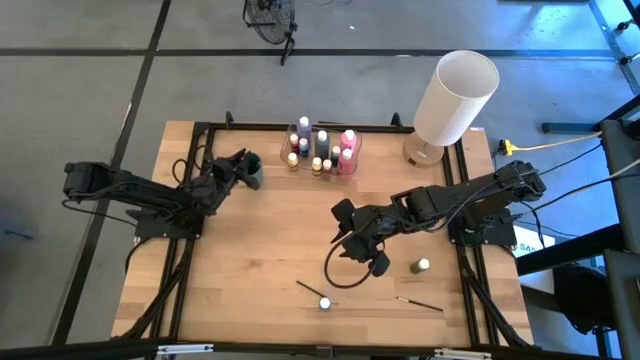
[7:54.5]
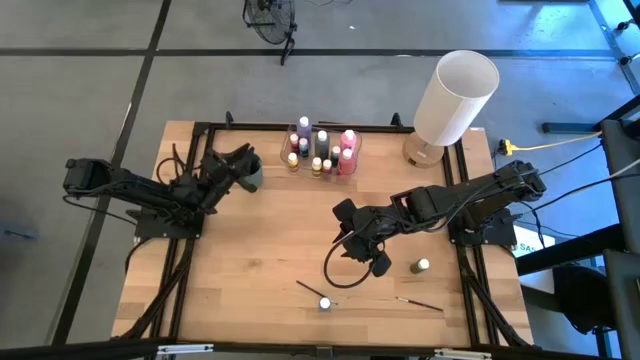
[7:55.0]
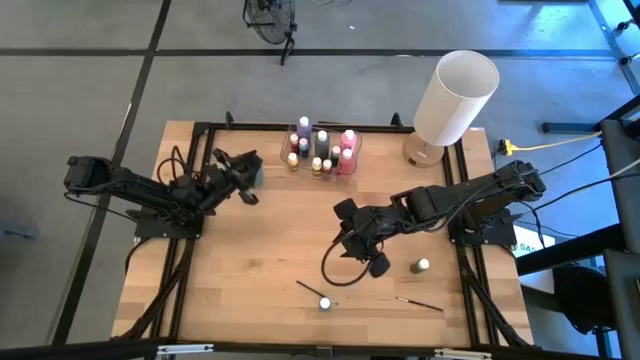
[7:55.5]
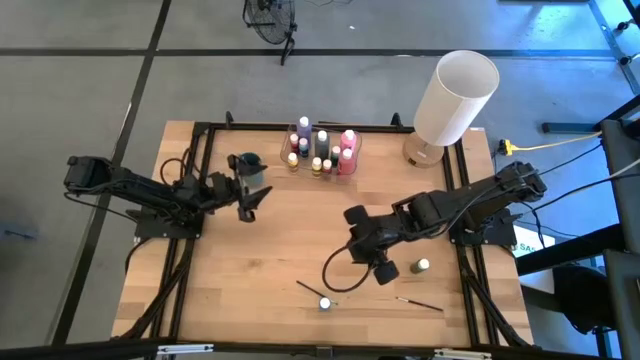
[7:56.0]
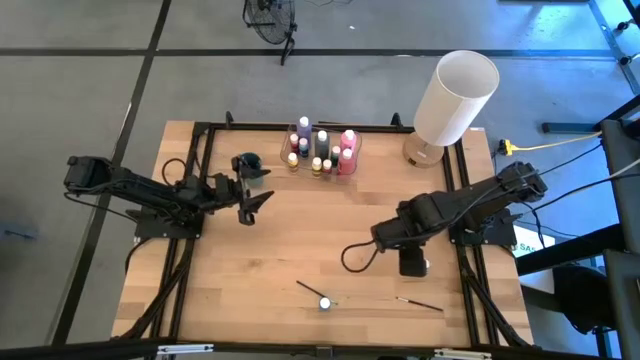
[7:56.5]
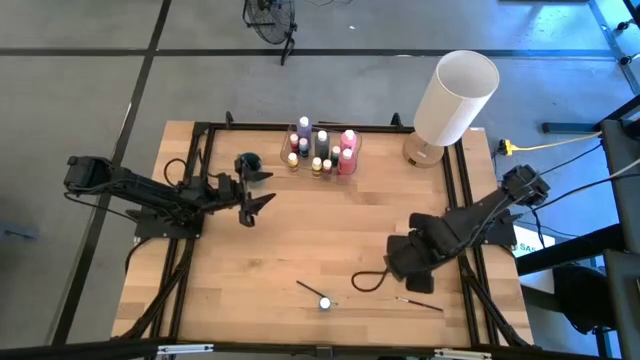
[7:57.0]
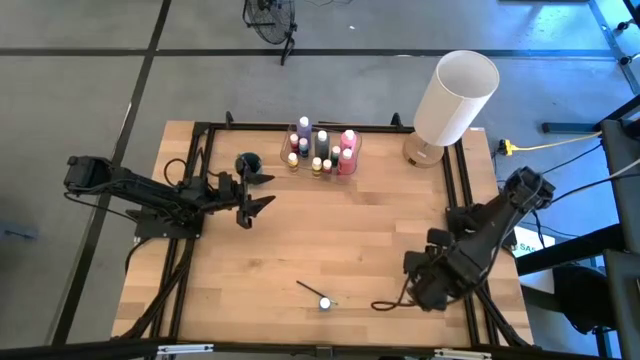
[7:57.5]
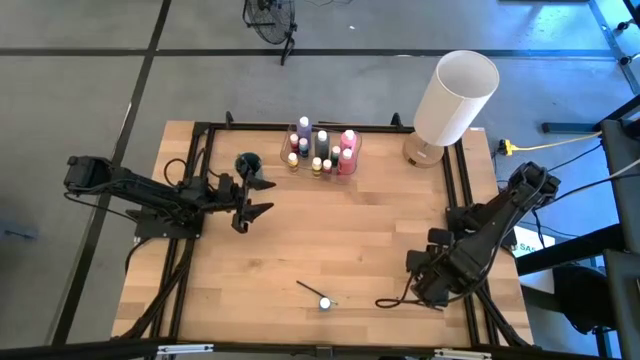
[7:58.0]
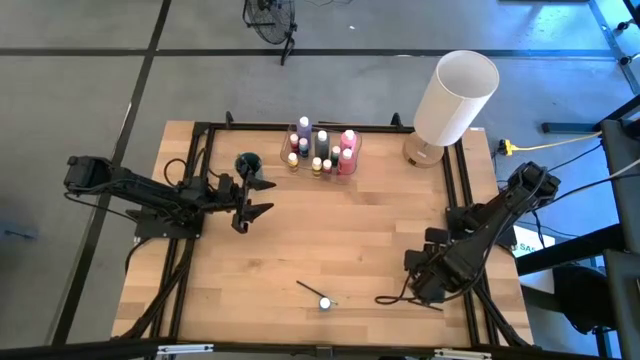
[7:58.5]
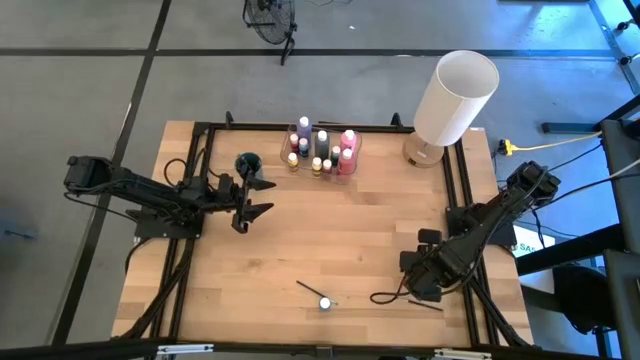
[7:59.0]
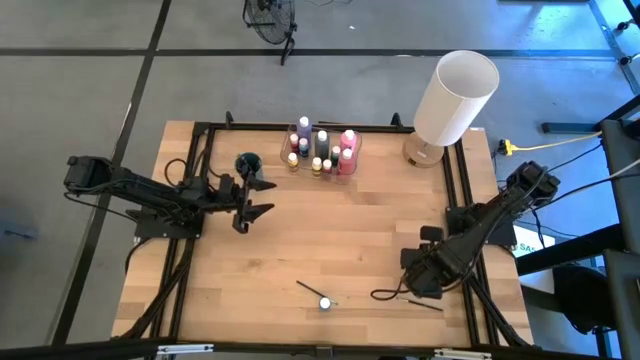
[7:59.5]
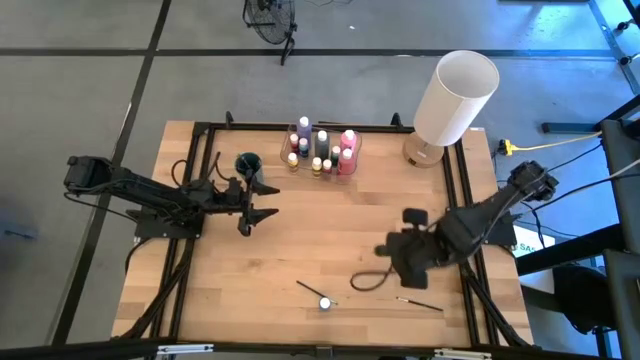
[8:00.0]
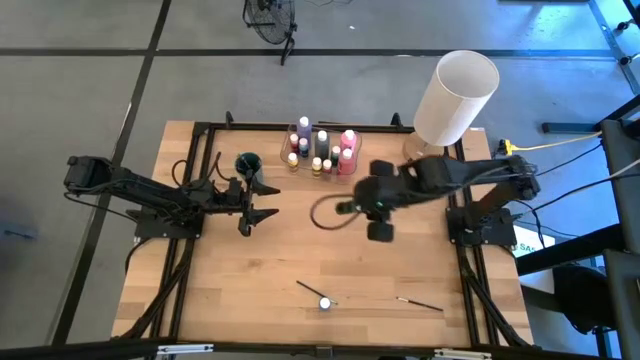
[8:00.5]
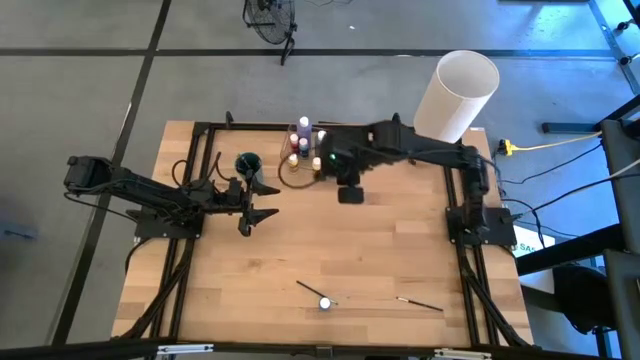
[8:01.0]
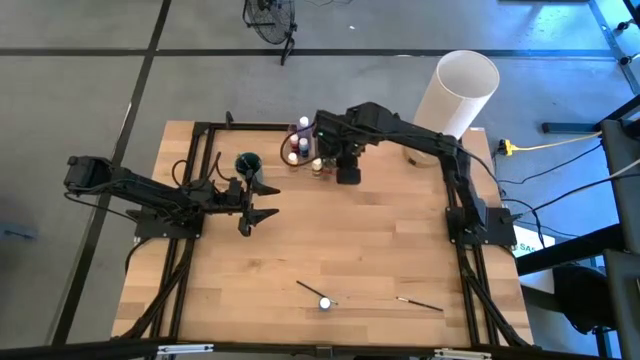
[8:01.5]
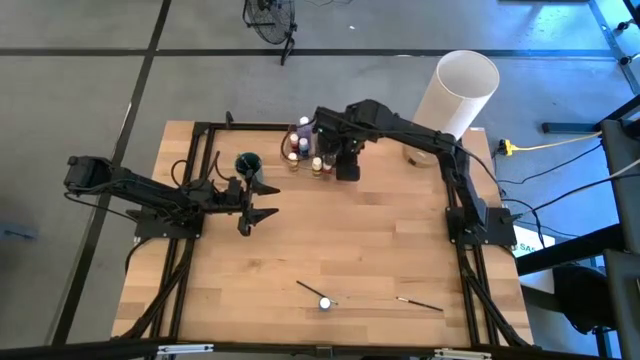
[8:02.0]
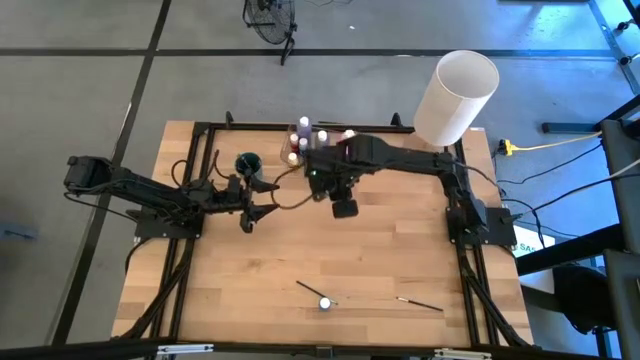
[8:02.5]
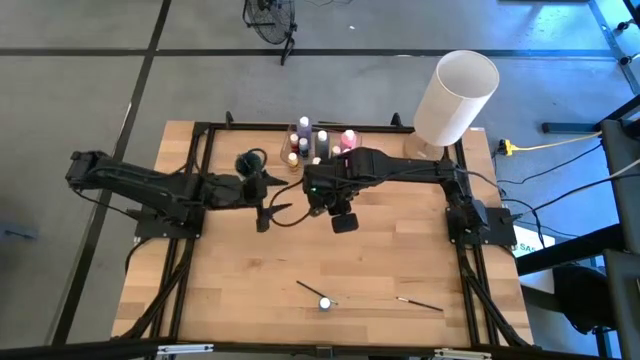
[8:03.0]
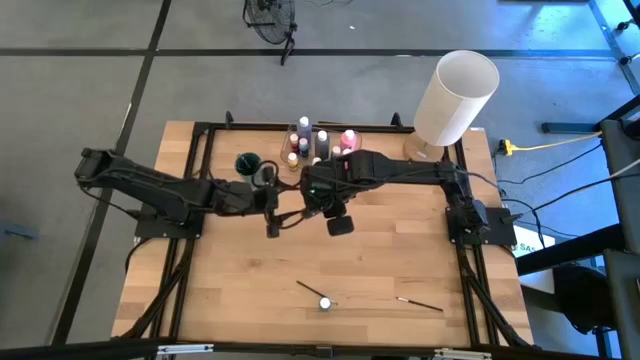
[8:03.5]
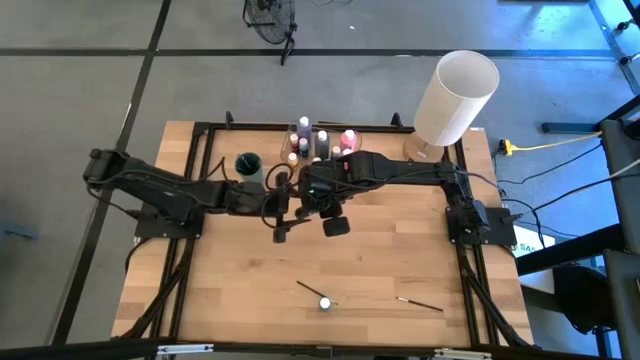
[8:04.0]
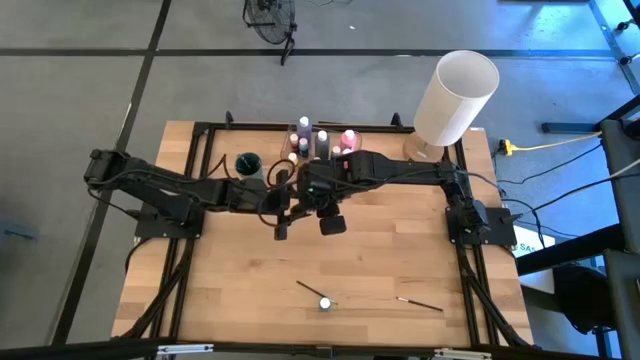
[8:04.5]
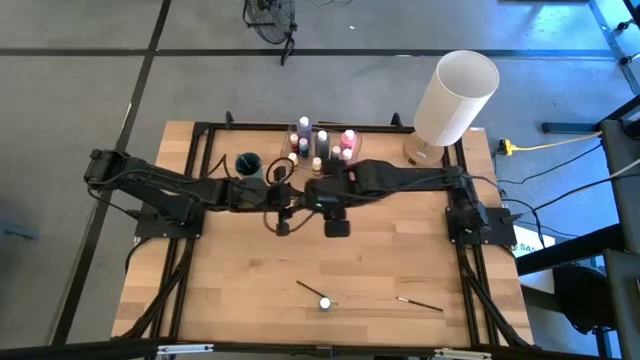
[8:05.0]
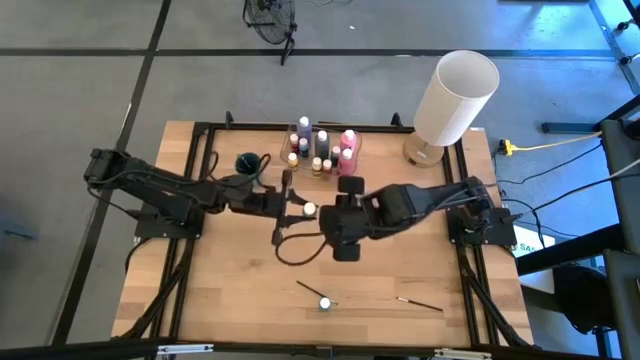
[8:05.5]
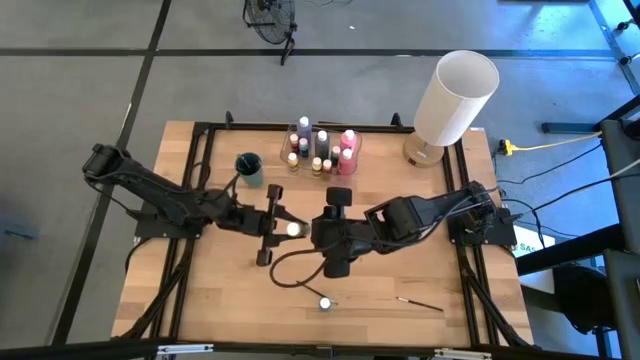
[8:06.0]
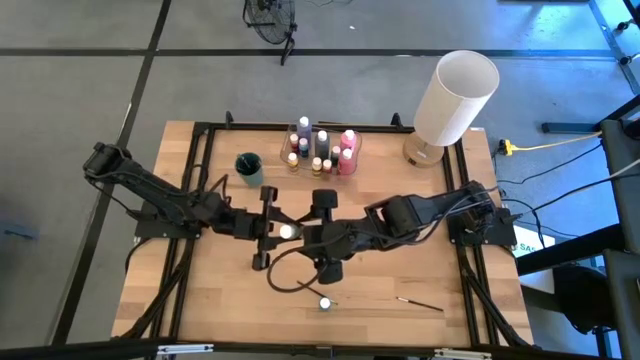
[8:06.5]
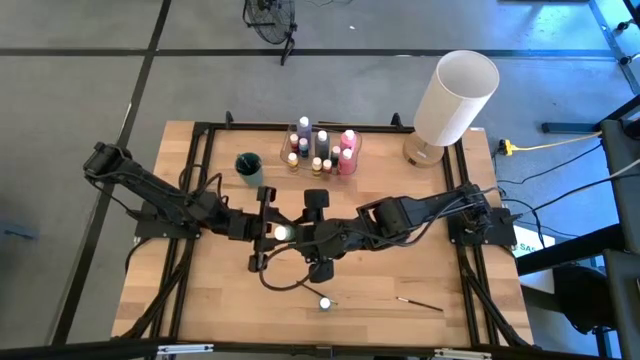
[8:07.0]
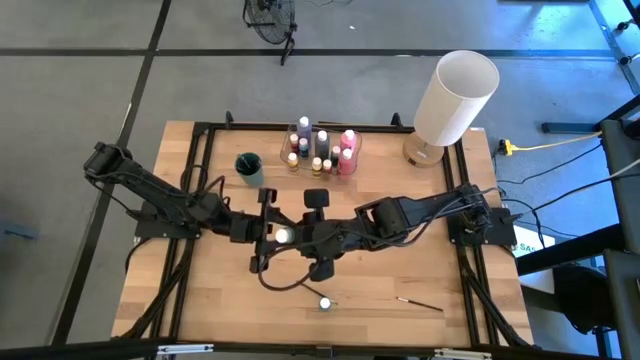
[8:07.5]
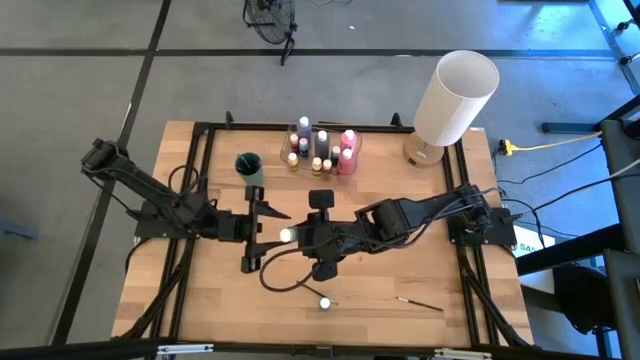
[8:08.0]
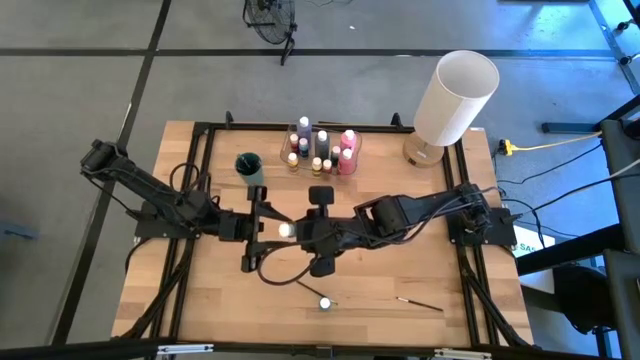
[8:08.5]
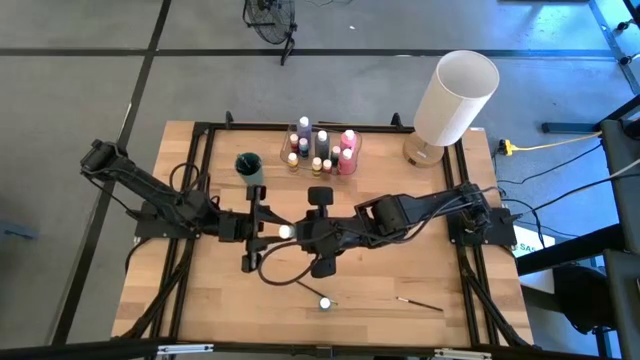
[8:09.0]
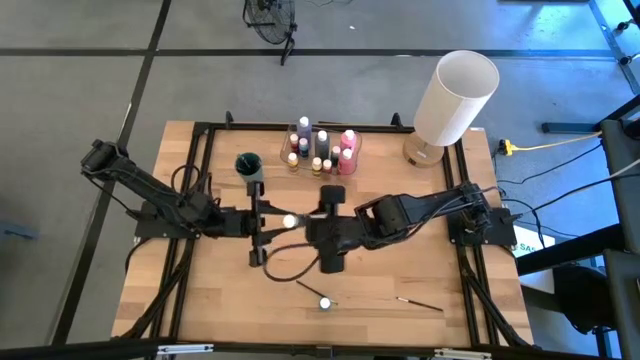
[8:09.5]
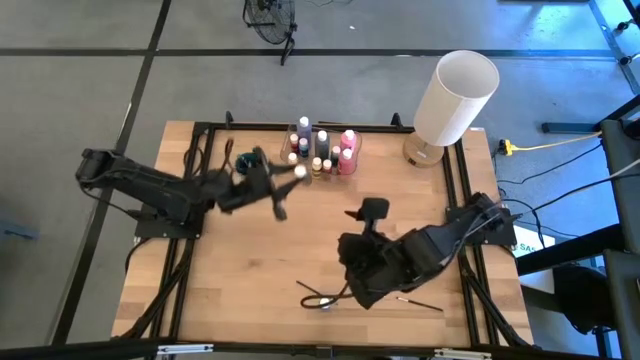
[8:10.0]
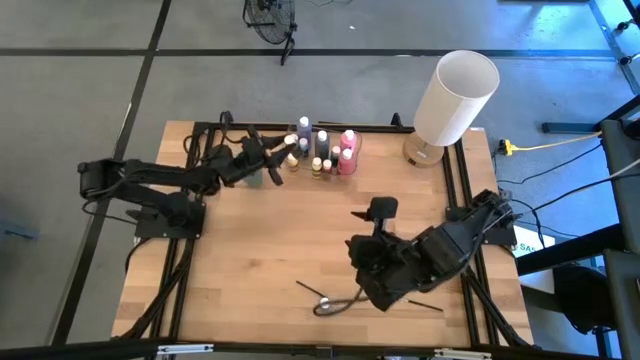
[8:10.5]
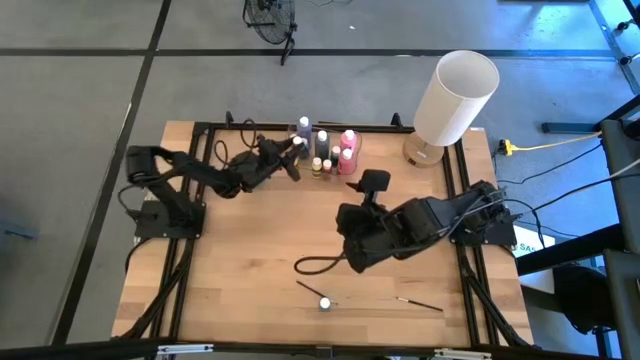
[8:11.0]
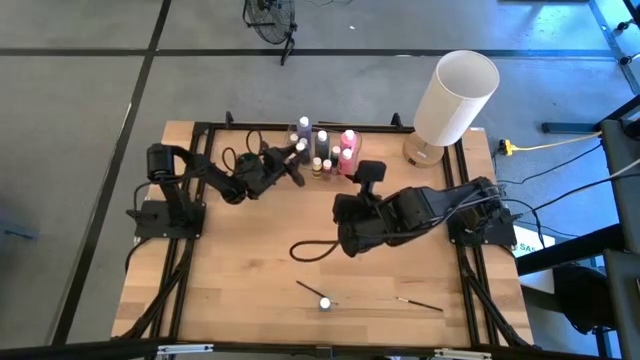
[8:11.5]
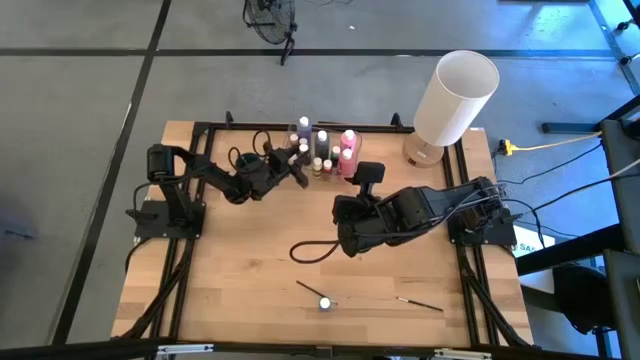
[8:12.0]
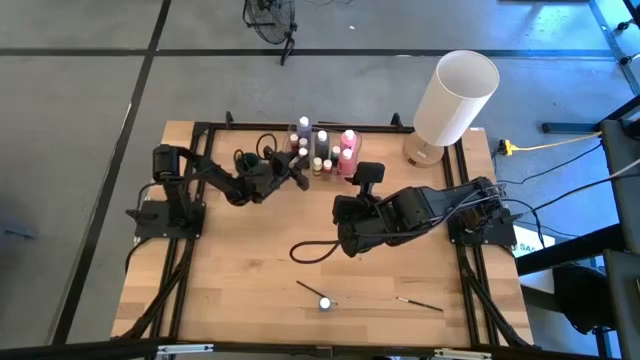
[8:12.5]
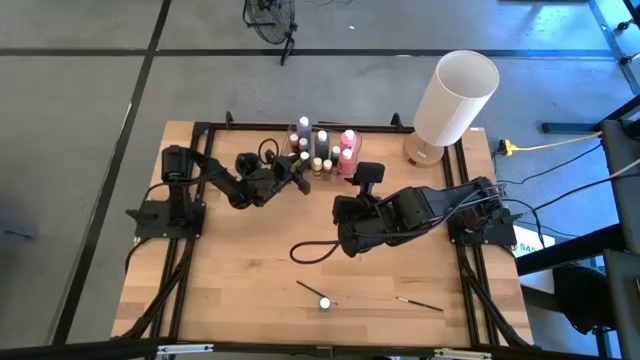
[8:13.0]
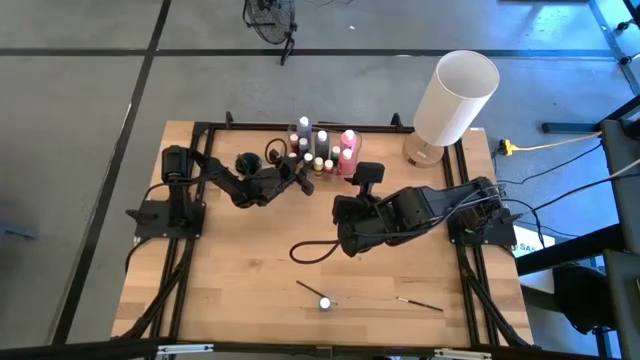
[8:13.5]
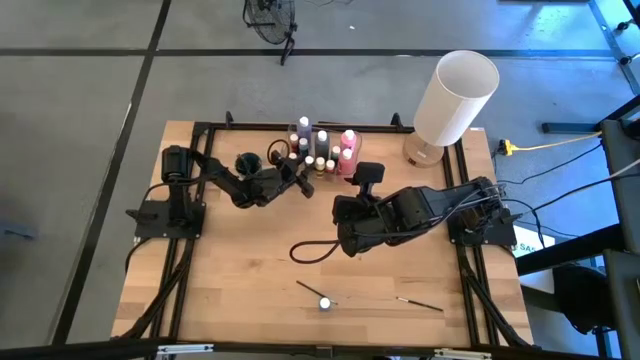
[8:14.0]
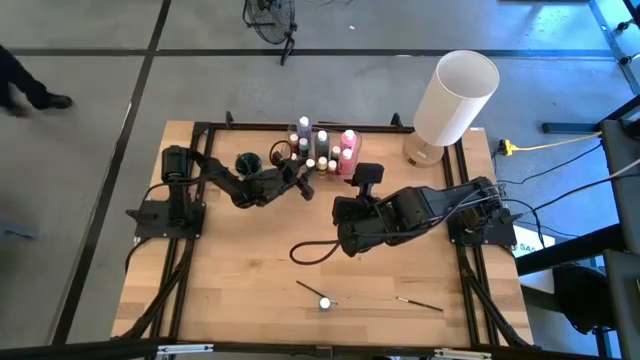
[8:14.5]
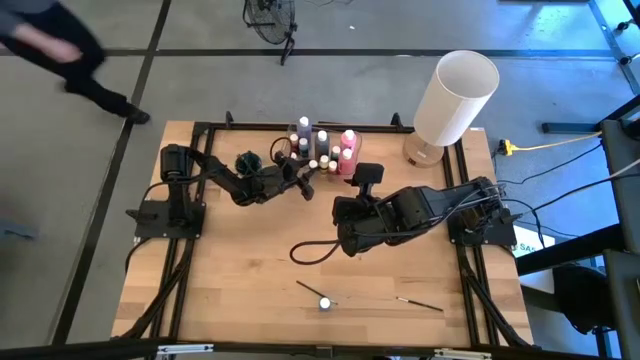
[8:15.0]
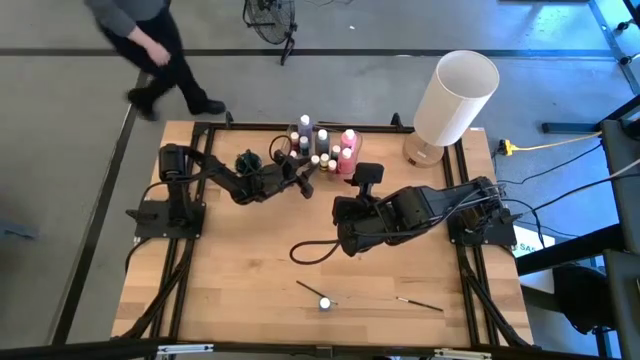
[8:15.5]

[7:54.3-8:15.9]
Task: Pick & Place Paint Supplies
Put the green paint bottle into the transparent bin

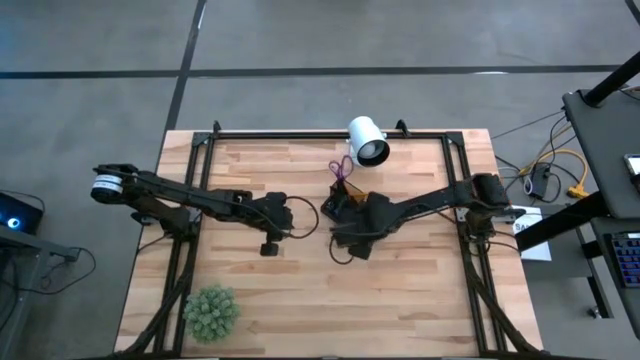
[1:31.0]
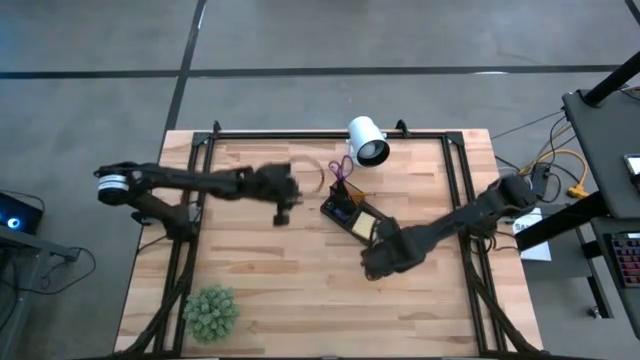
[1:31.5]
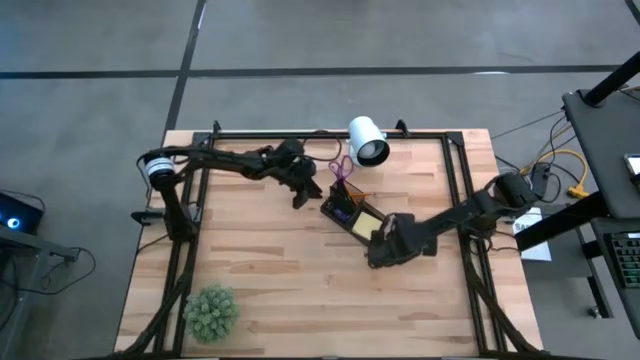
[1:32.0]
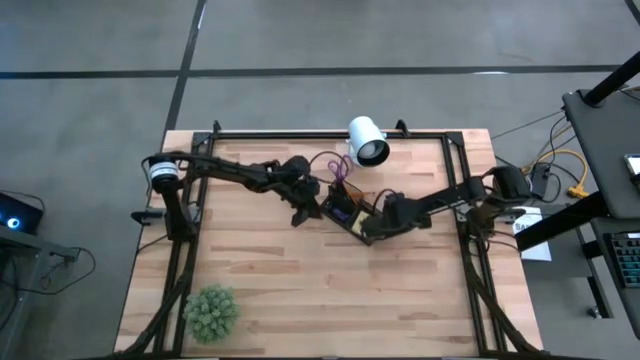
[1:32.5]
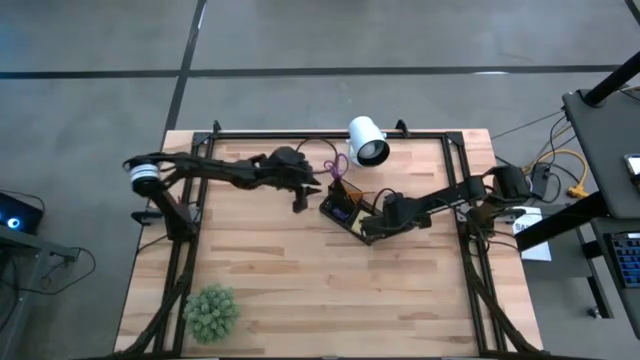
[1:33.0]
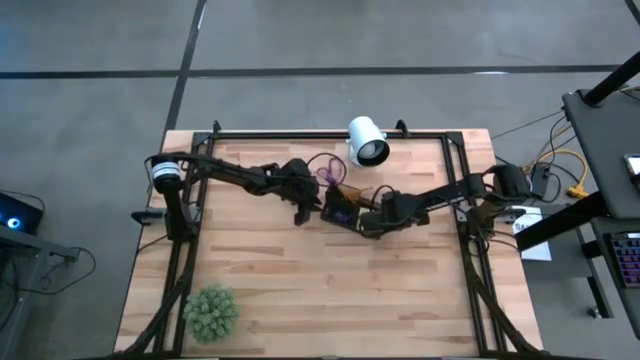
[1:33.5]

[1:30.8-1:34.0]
Task: Pick and place office supplies into organizer
Adjust the black mesh organizer on the table
